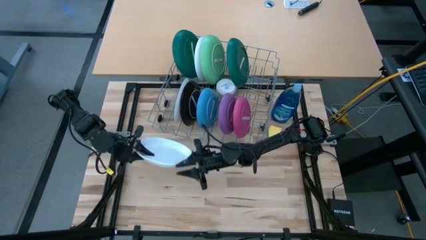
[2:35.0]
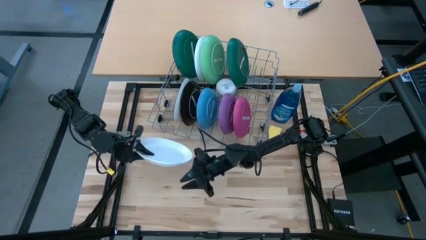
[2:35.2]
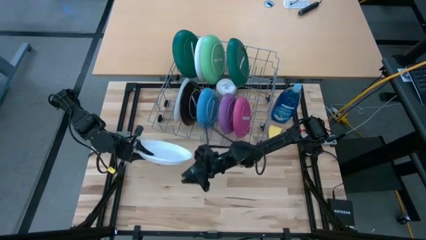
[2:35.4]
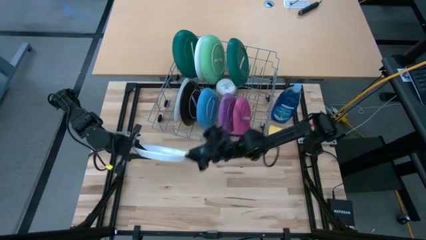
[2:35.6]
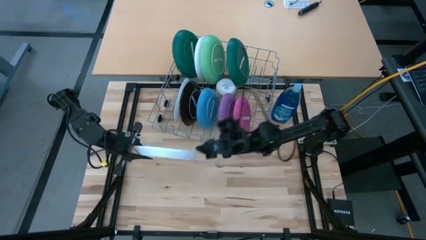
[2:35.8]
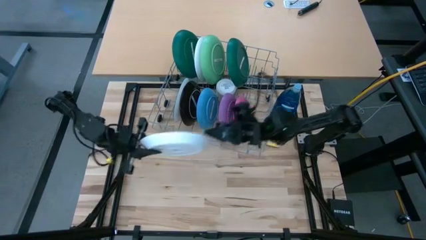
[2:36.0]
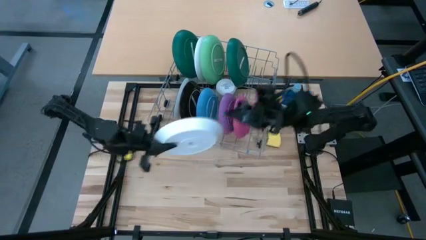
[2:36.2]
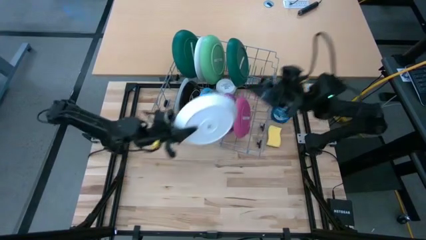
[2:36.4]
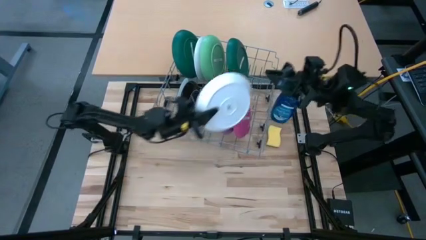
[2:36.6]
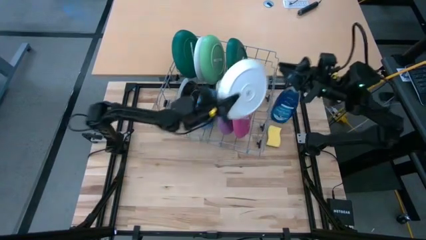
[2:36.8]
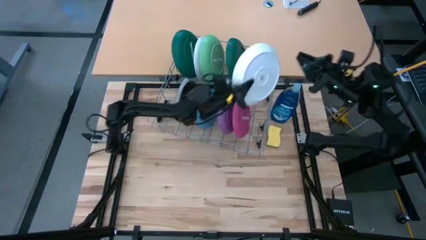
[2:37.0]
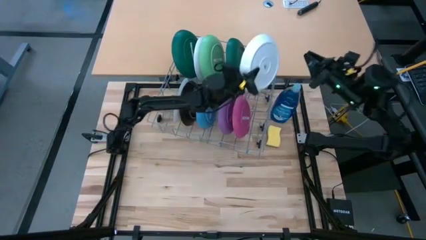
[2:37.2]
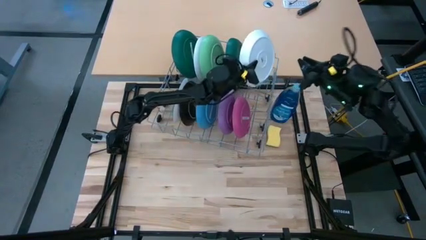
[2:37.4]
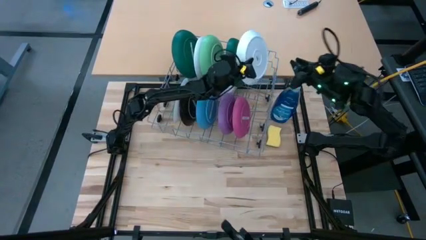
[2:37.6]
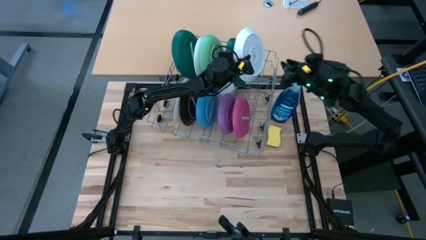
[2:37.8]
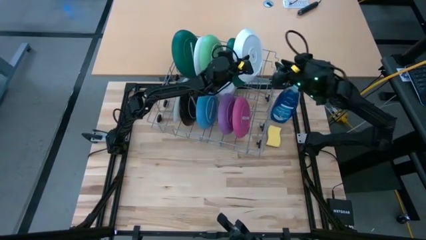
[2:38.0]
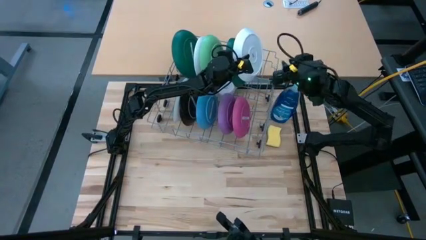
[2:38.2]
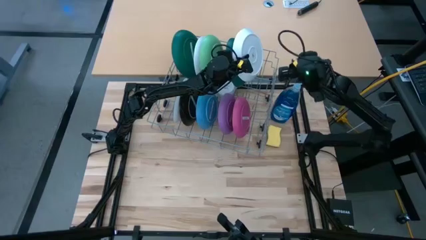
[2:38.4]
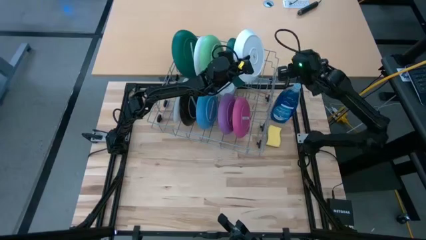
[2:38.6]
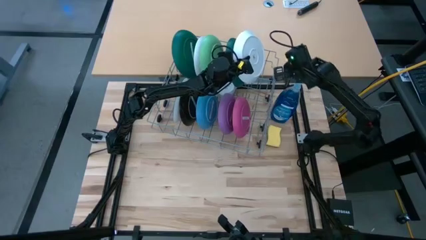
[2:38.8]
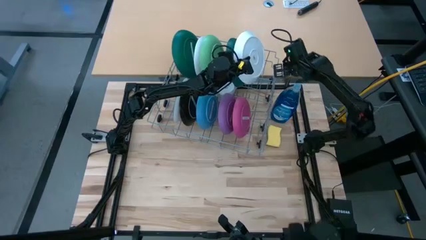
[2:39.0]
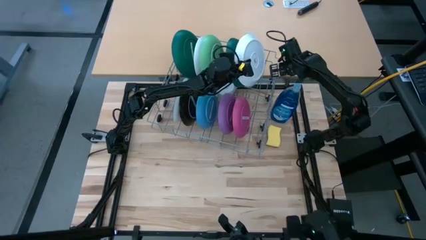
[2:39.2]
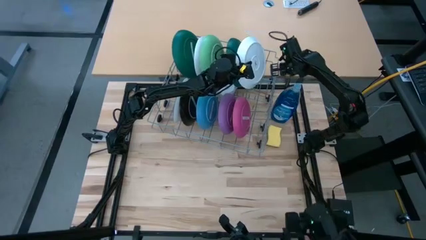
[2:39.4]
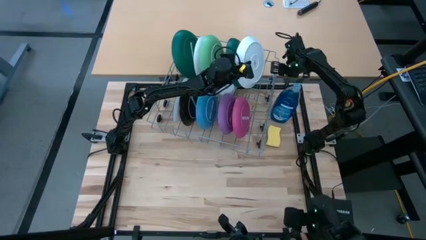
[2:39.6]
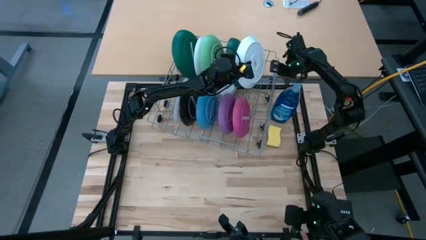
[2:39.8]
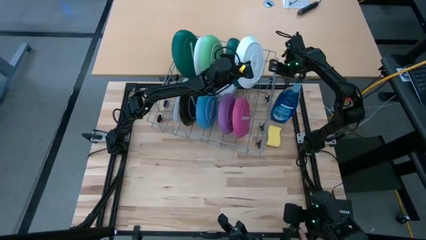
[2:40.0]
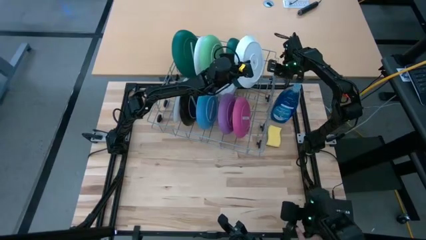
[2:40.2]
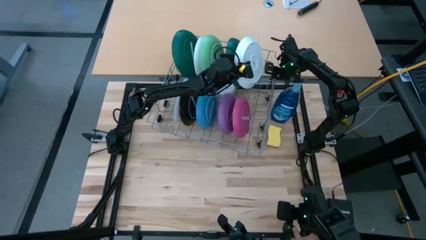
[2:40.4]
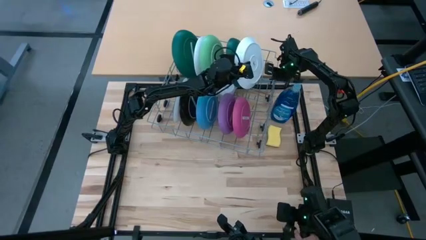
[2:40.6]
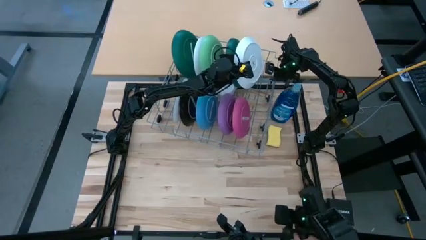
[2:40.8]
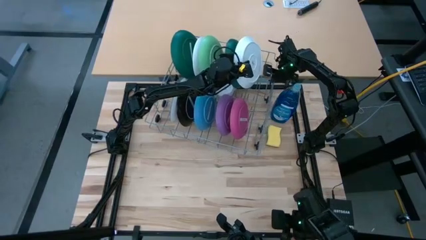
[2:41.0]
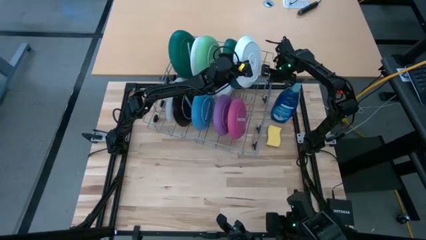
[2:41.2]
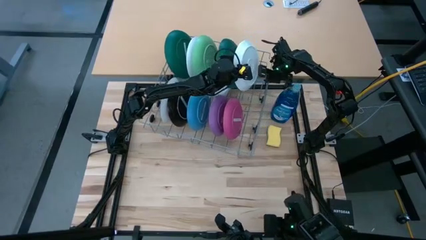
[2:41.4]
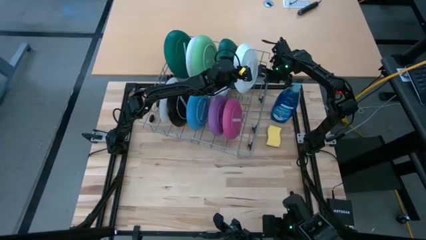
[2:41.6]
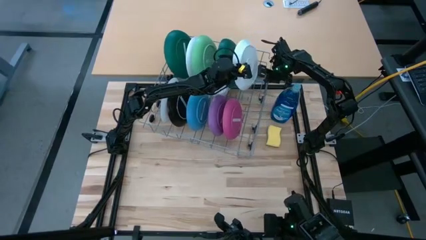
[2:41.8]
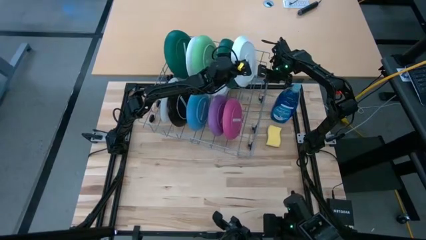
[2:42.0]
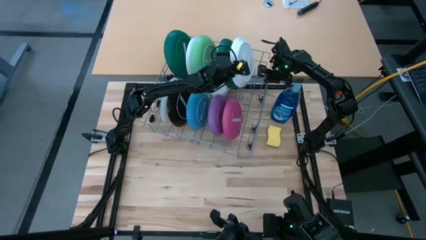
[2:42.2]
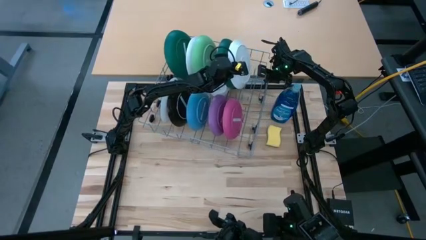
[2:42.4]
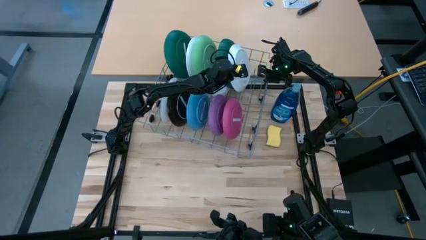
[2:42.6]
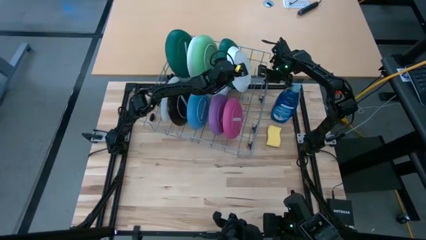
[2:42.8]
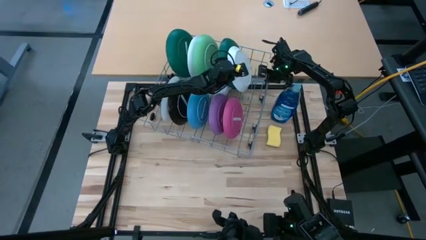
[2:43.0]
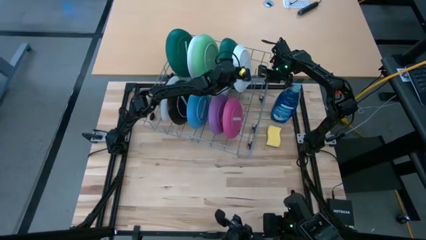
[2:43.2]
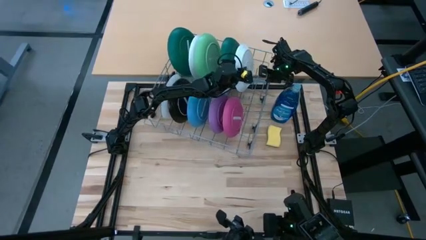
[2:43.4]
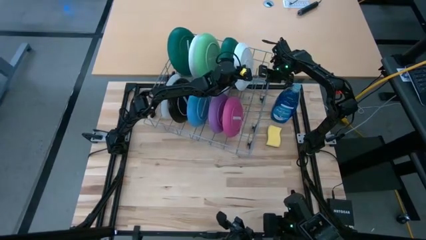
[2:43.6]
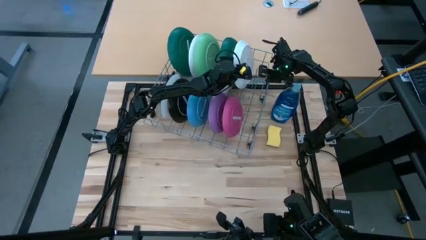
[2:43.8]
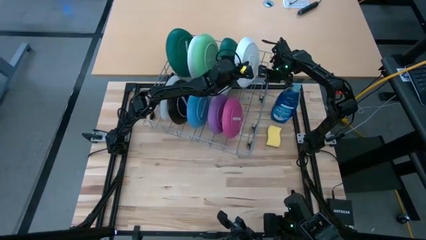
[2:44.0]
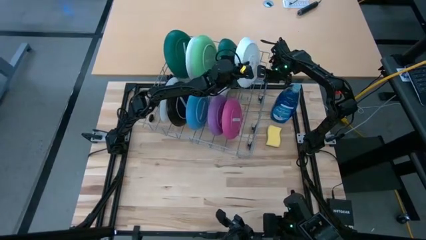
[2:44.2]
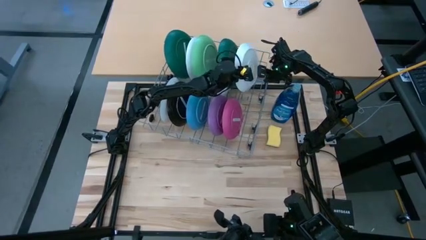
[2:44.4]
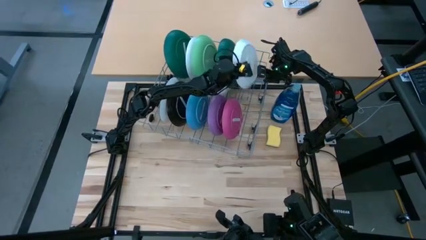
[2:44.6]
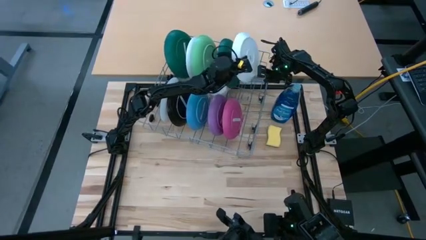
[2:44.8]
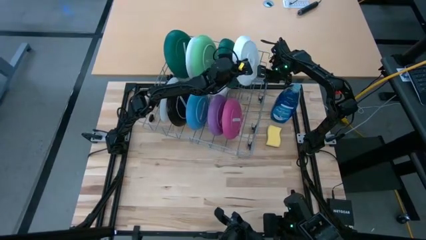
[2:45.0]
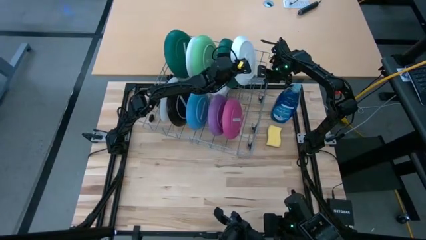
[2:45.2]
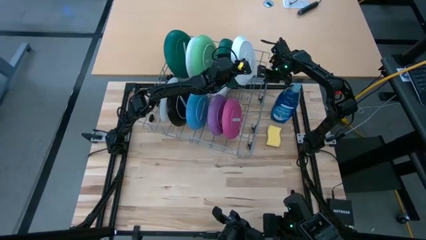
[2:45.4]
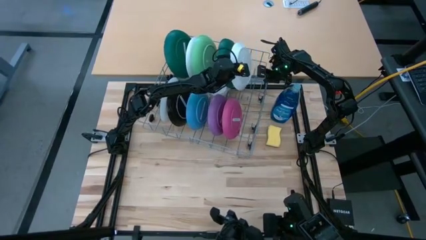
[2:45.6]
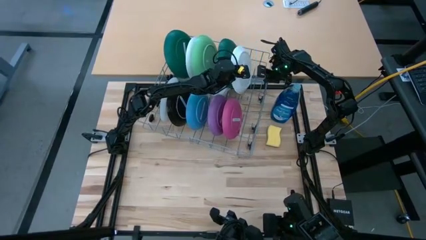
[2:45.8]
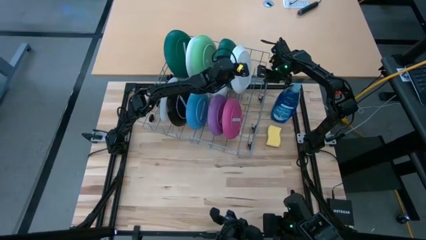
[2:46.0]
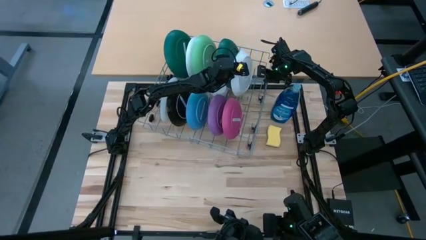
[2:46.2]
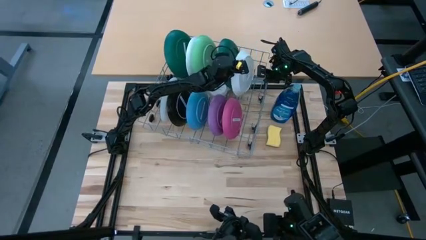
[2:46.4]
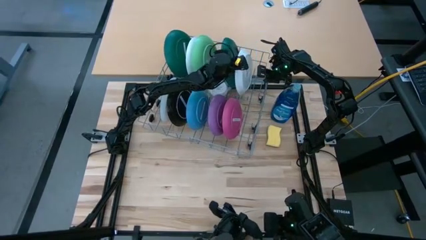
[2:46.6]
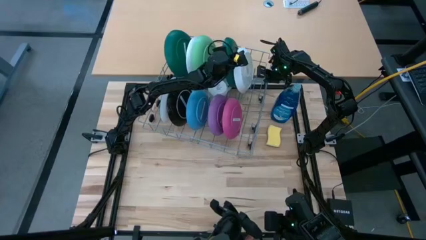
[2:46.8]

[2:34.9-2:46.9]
Task: Sort dishes
Put the white plate in the dish rack

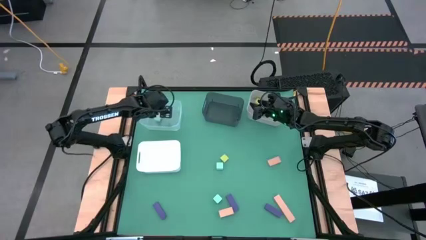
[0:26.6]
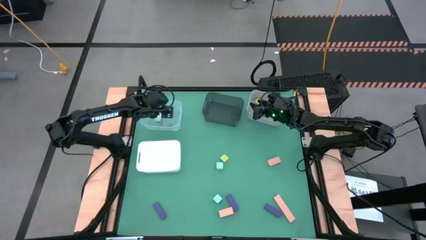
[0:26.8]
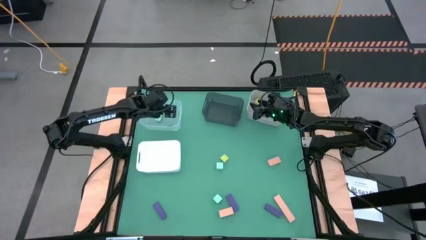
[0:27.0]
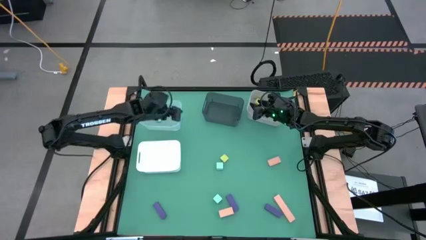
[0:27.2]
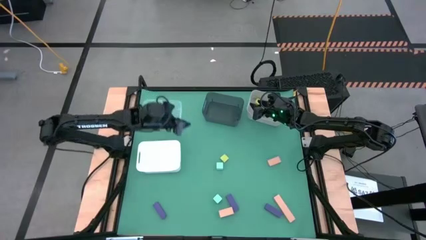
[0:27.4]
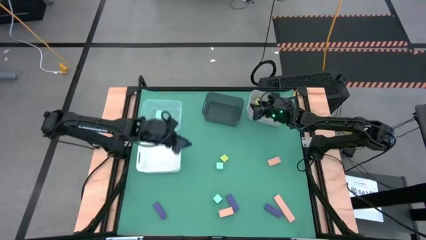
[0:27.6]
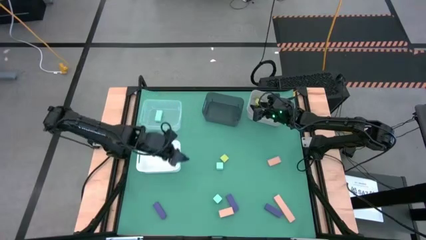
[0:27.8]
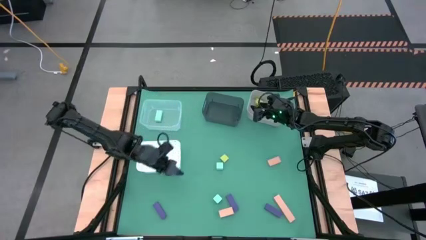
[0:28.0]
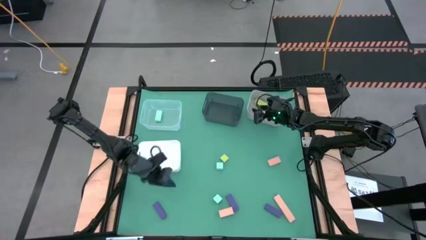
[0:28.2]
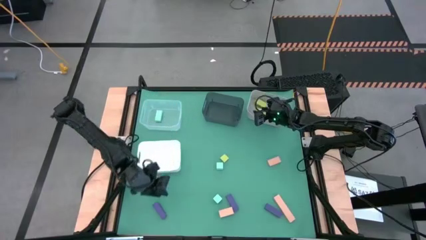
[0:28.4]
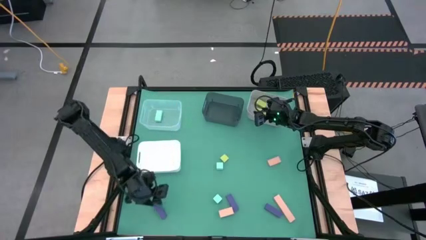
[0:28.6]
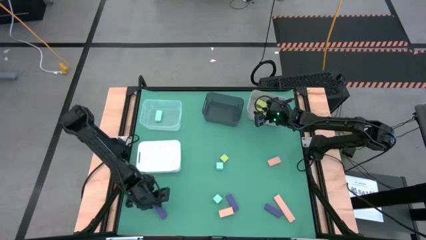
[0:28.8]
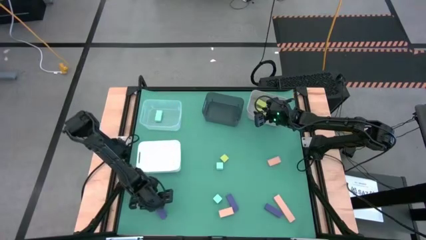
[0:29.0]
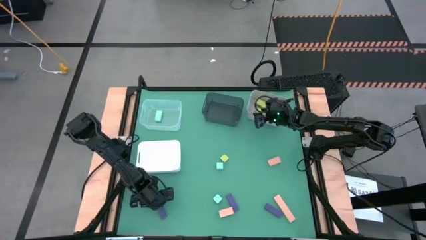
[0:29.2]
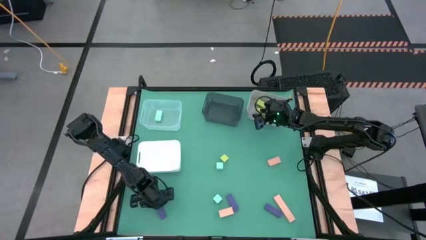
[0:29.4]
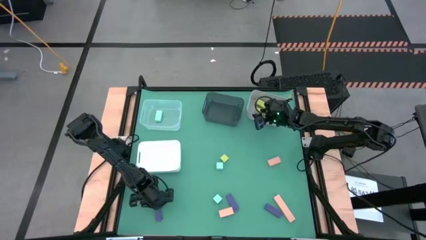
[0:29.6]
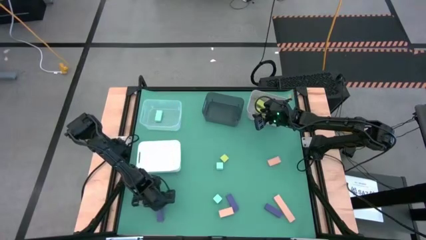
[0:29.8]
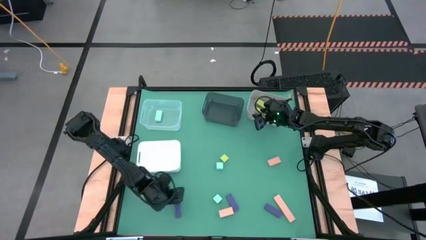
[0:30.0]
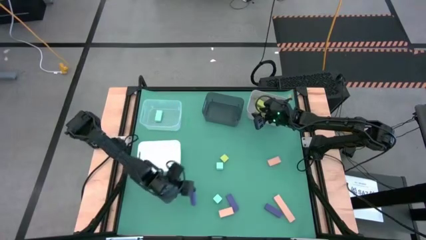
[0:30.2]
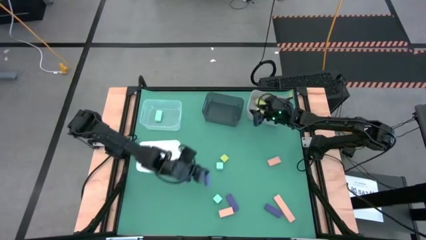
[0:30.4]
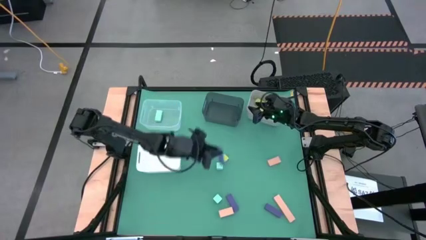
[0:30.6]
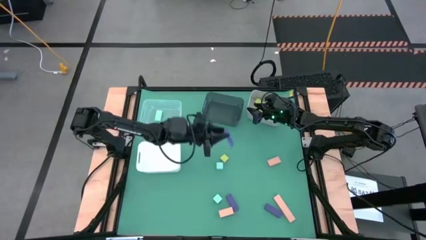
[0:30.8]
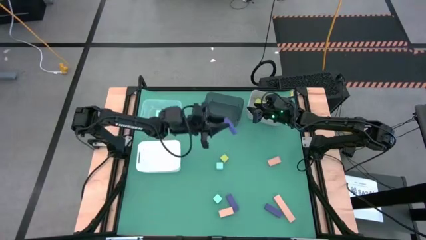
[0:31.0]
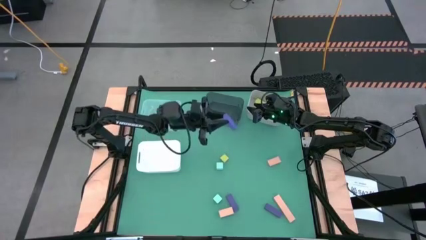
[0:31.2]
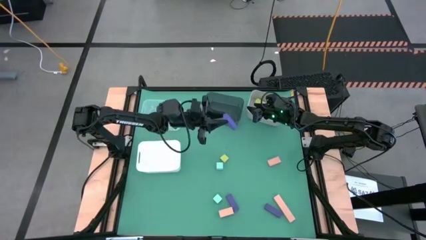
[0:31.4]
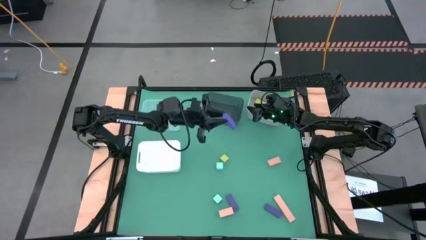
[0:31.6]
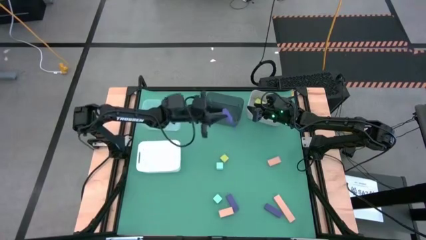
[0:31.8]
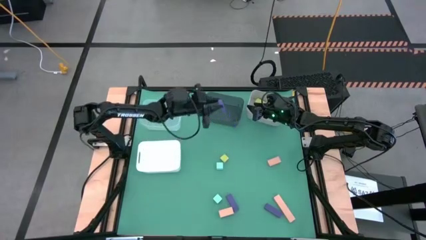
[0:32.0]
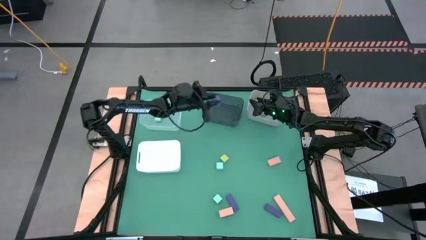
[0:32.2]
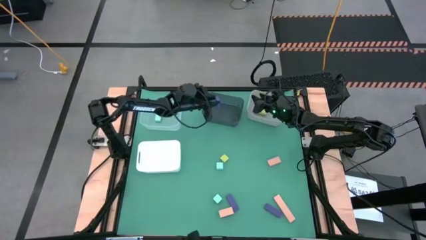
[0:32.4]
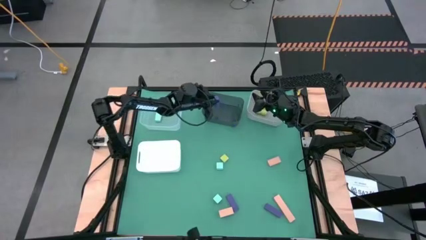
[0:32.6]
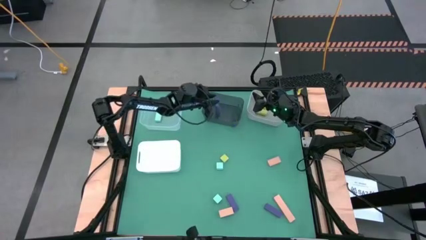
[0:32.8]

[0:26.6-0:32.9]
Task: Sort & place blocks by color
Put the left violet block into the black bin
